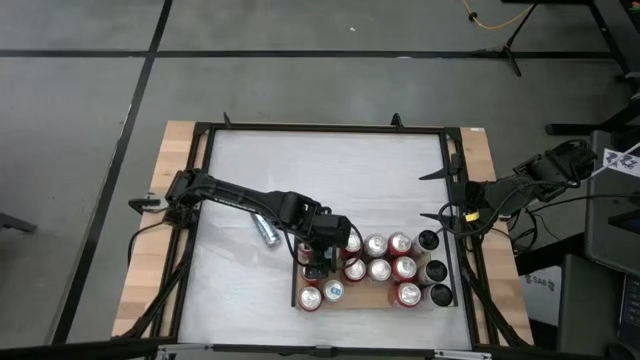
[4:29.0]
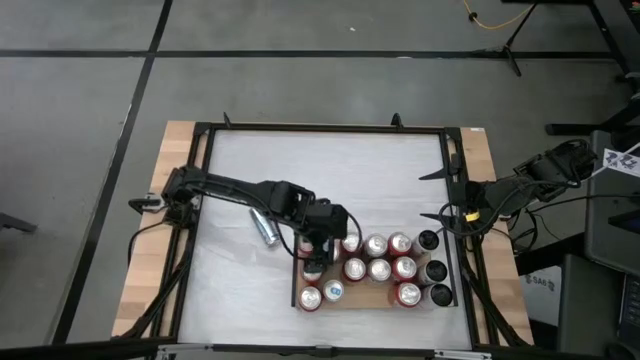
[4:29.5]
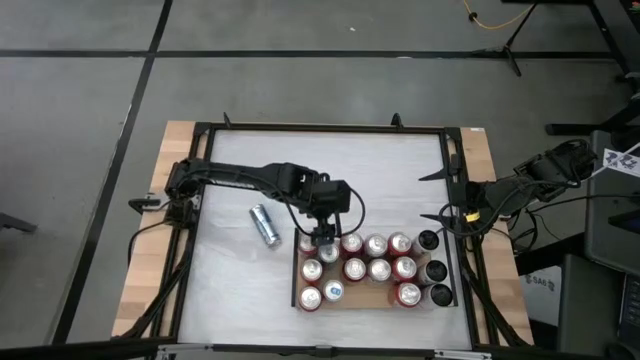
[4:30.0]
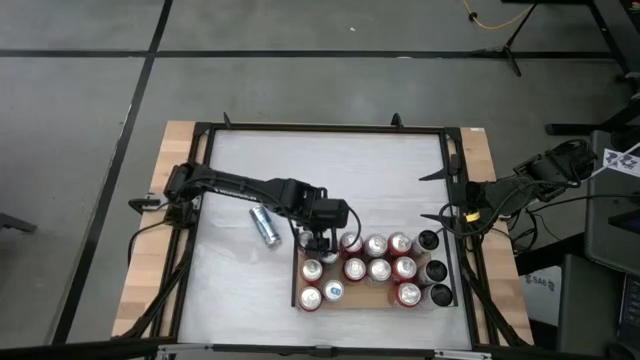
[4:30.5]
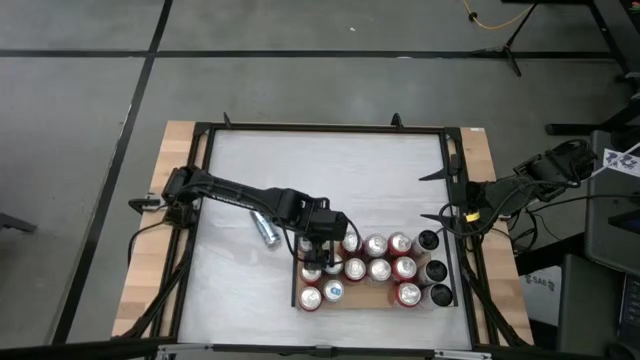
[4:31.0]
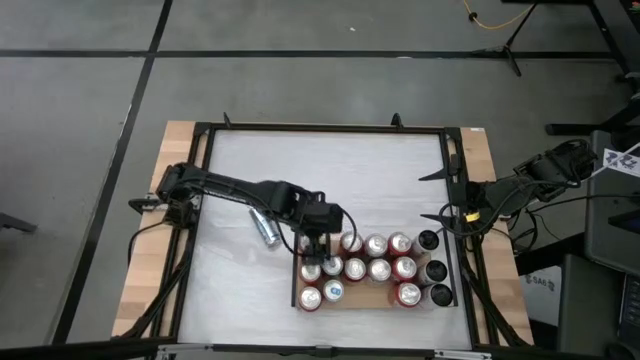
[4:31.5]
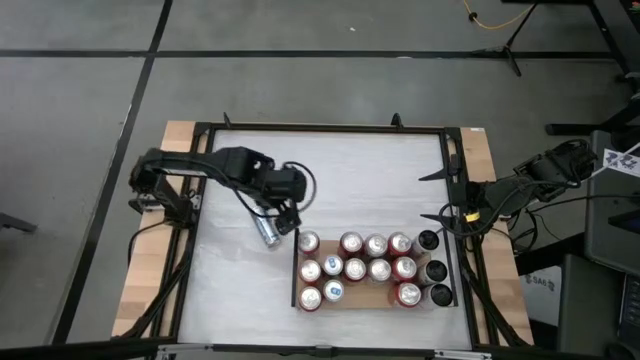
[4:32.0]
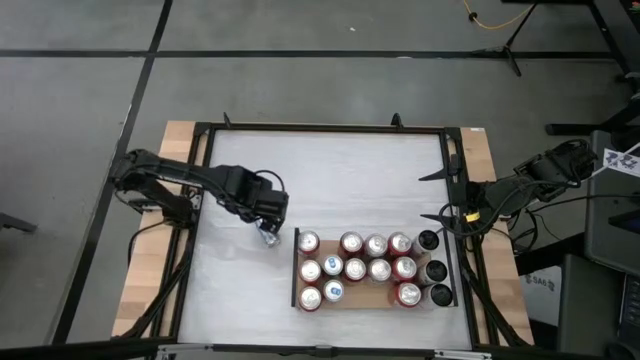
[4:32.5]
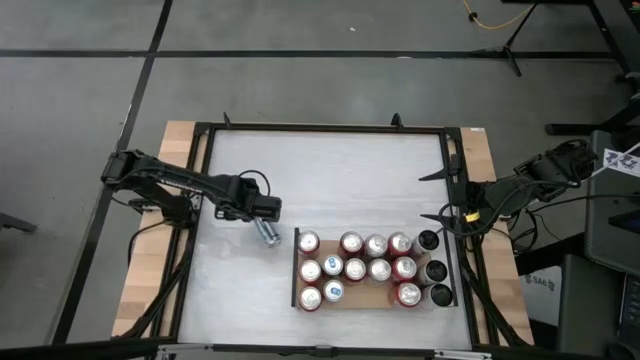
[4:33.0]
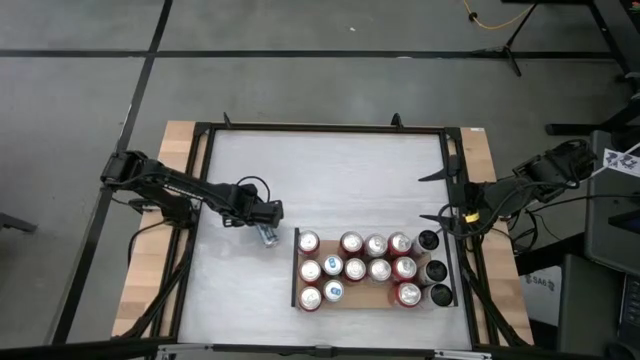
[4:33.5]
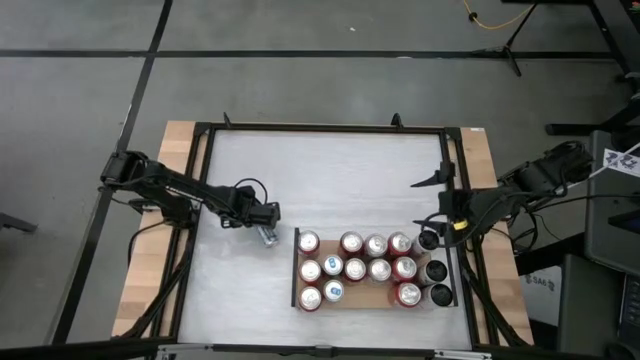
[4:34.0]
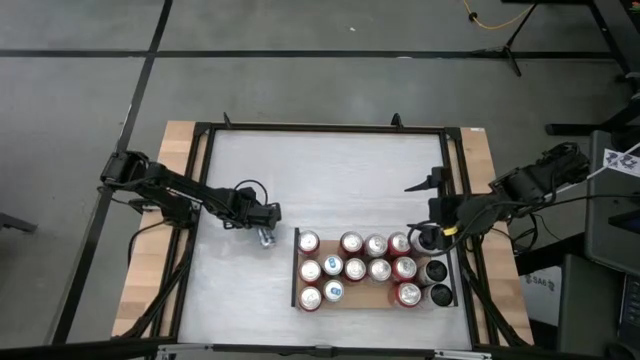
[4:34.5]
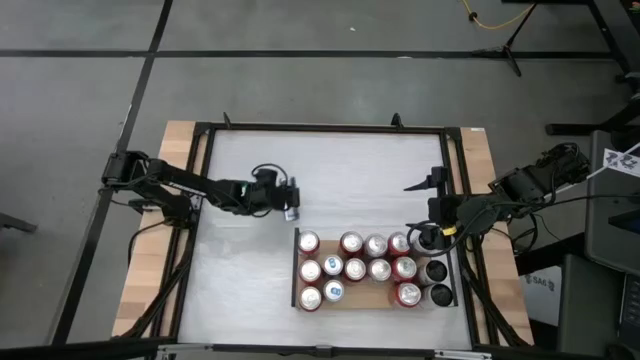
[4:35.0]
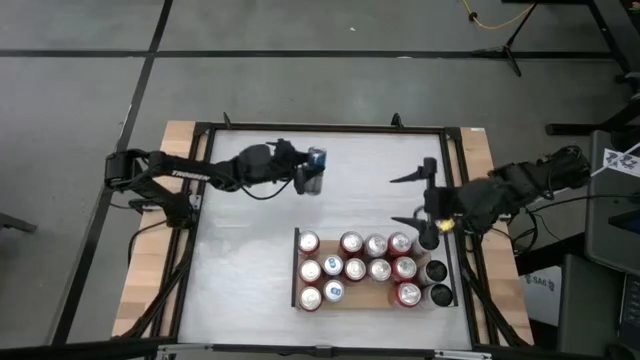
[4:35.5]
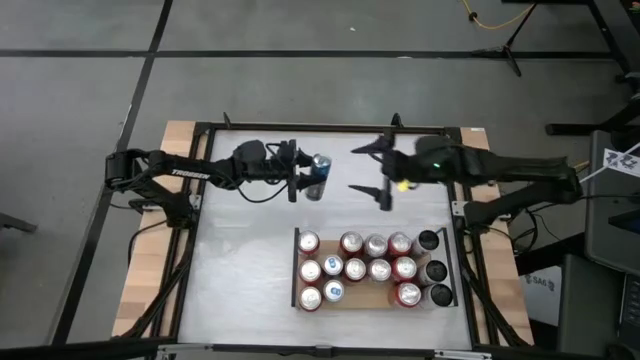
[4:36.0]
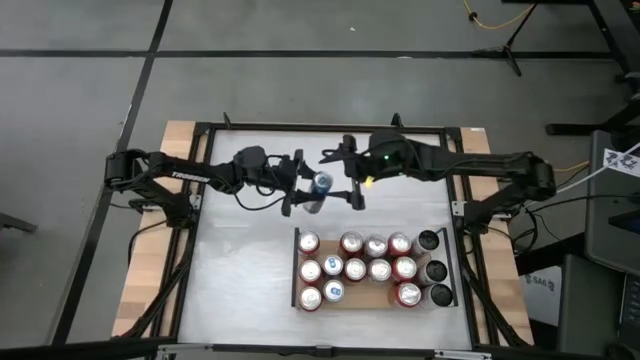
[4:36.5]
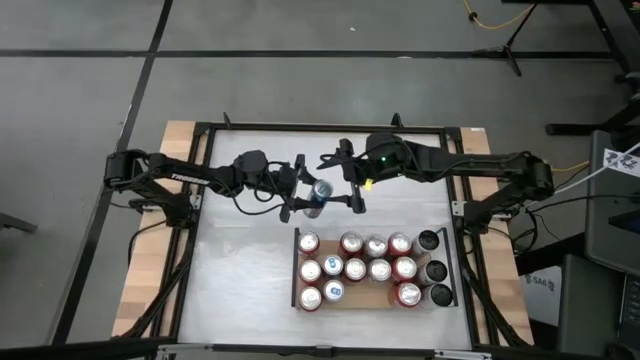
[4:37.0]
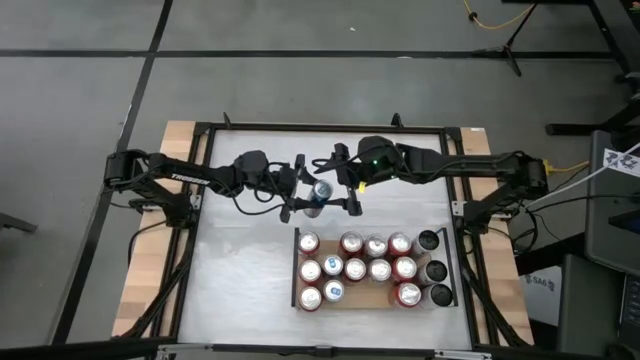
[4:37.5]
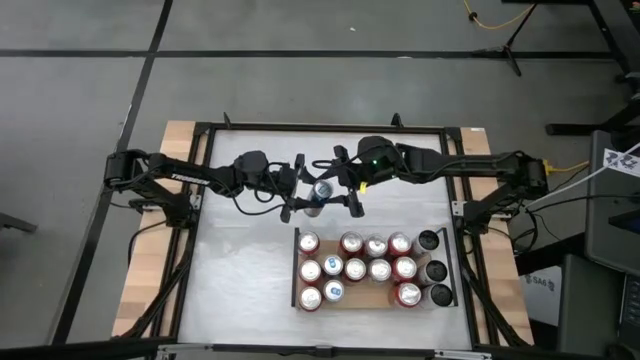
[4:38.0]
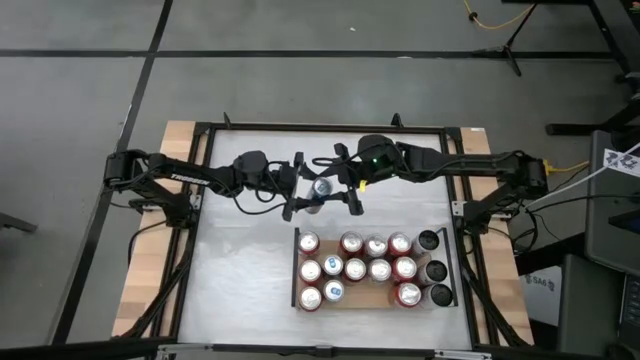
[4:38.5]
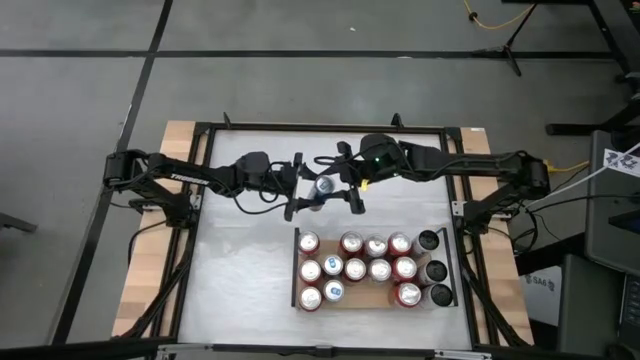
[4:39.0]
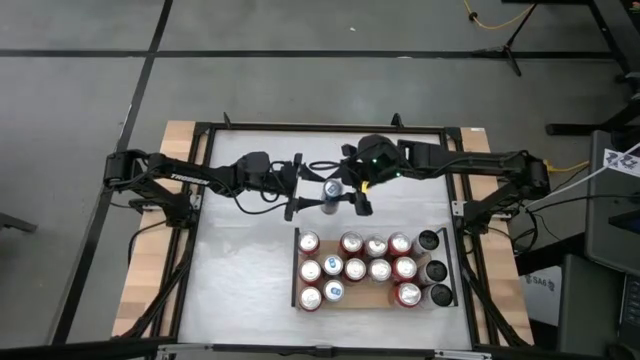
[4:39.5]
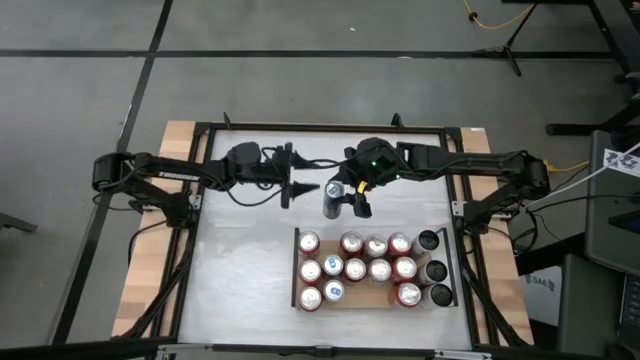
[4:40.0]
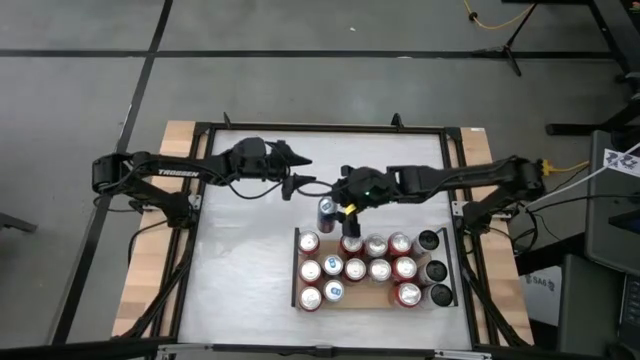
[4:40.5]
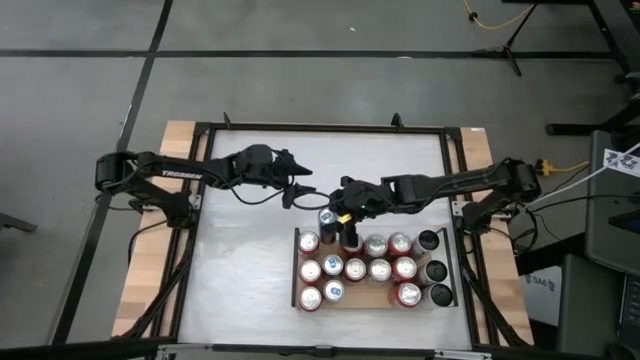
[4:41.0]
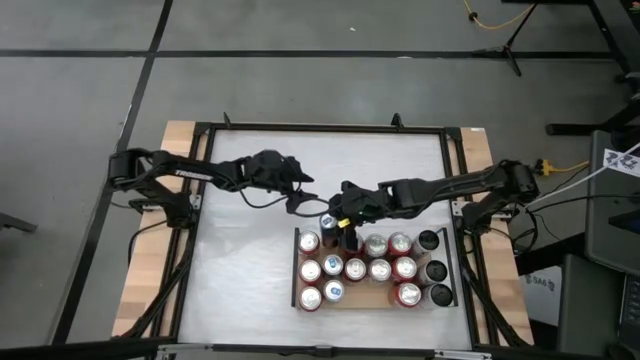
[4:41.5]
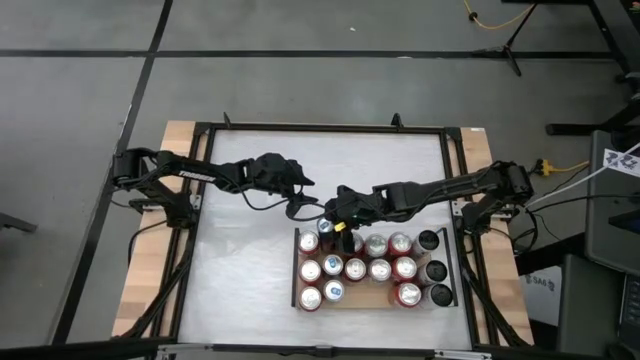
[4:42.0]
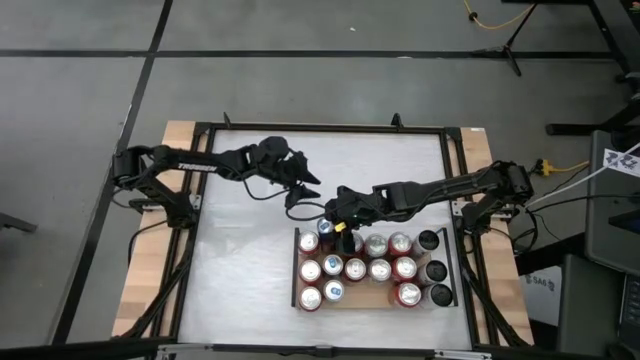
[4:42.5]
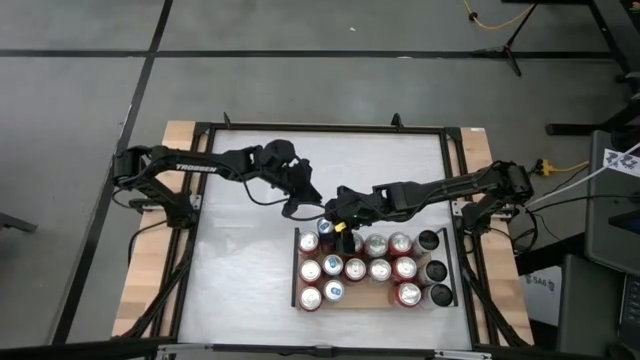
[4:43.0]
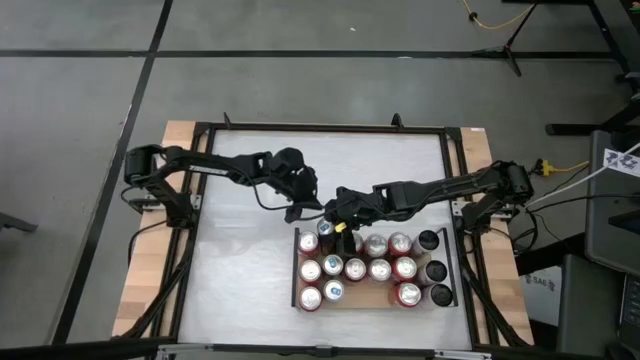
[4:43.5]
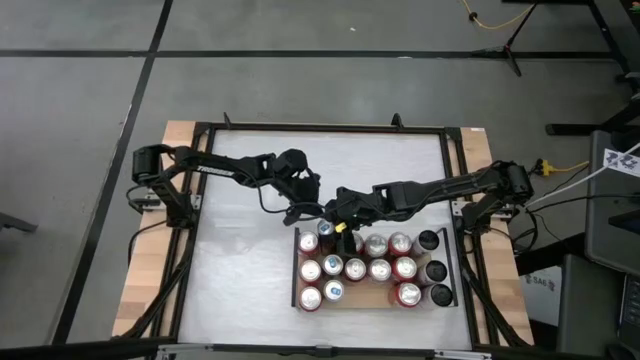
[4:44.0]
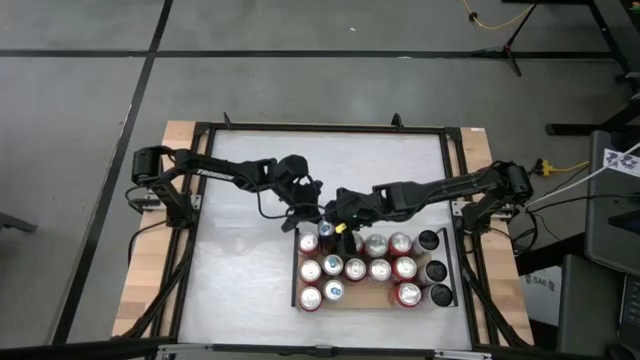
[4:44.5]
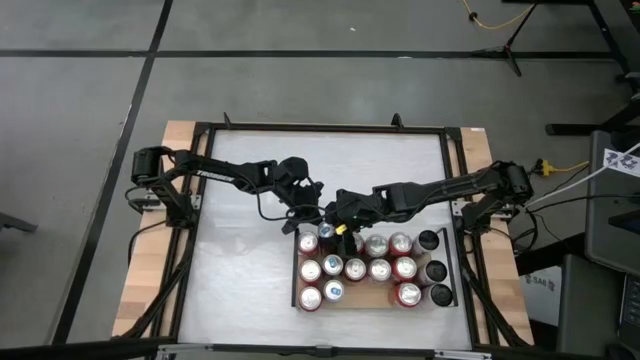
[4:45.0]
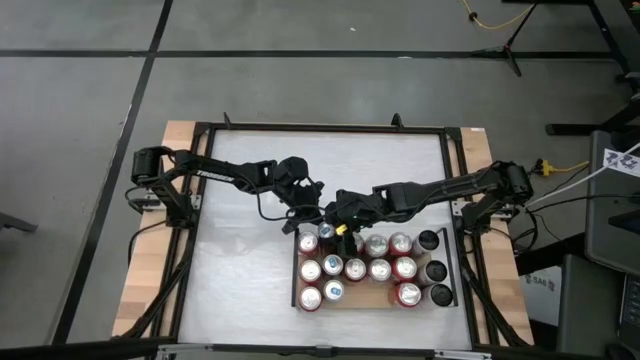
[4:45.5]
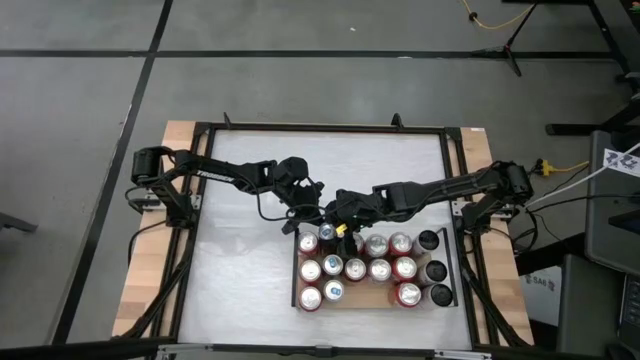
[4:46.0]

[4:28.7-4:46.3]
Task: Place canned beverage on shelf
Put the blue soda can on the shelf

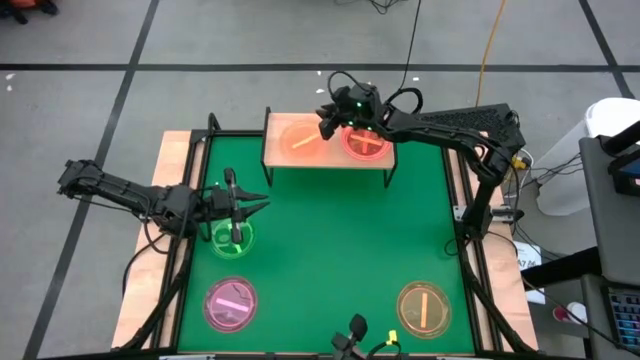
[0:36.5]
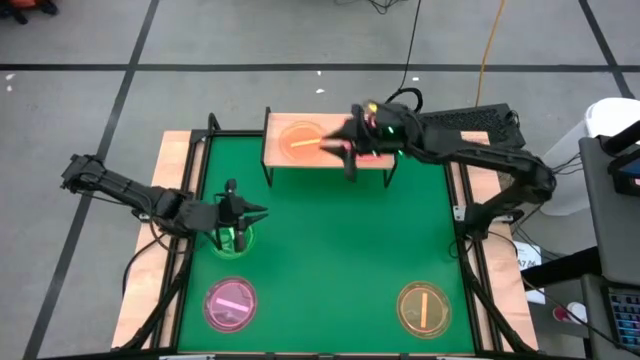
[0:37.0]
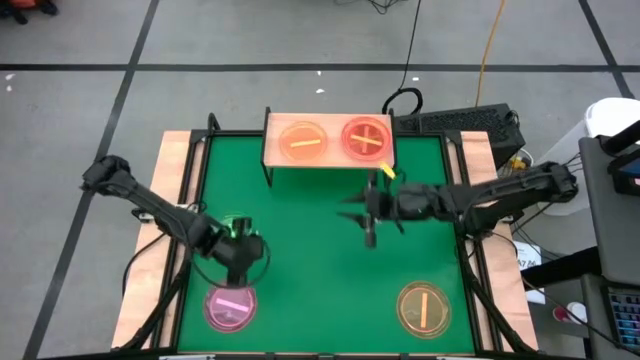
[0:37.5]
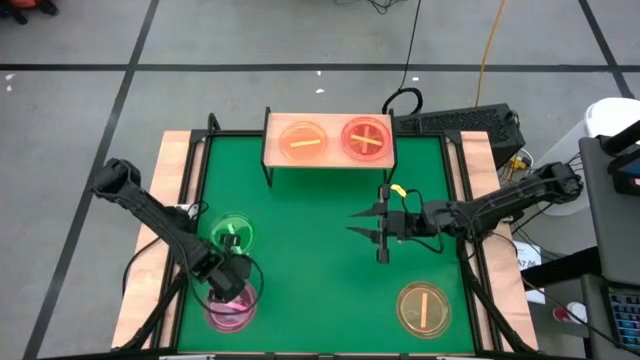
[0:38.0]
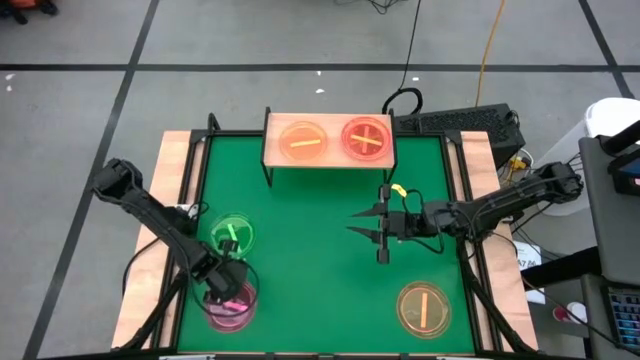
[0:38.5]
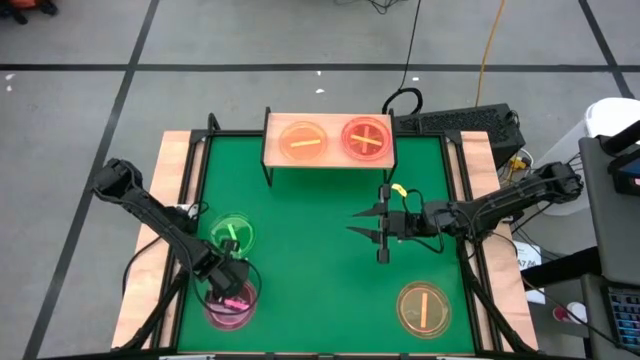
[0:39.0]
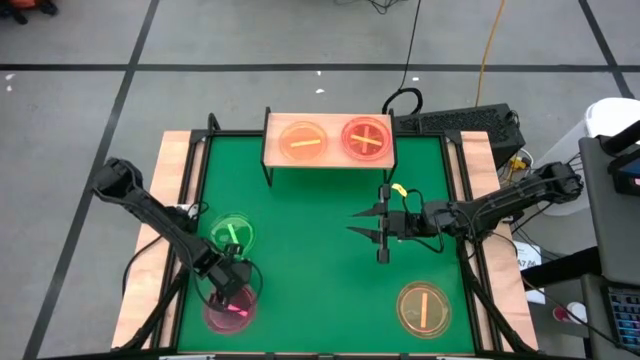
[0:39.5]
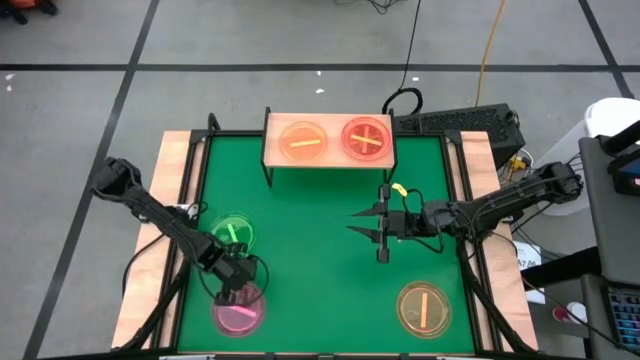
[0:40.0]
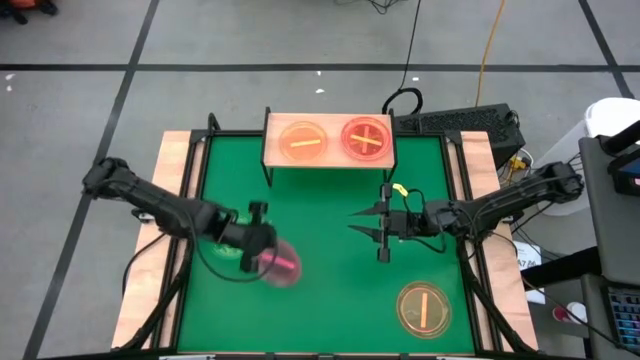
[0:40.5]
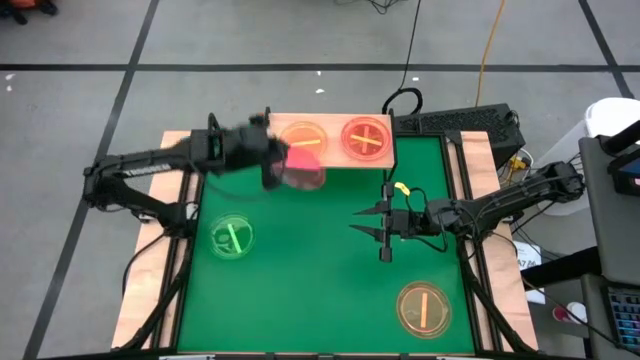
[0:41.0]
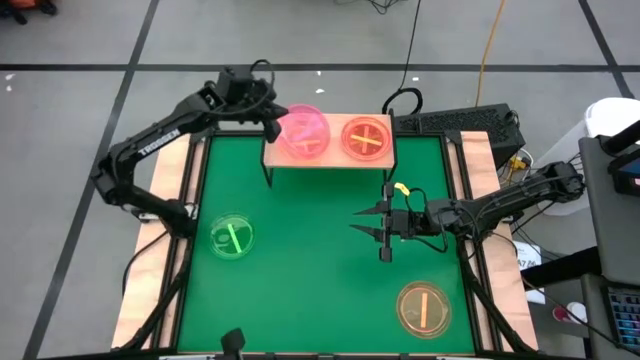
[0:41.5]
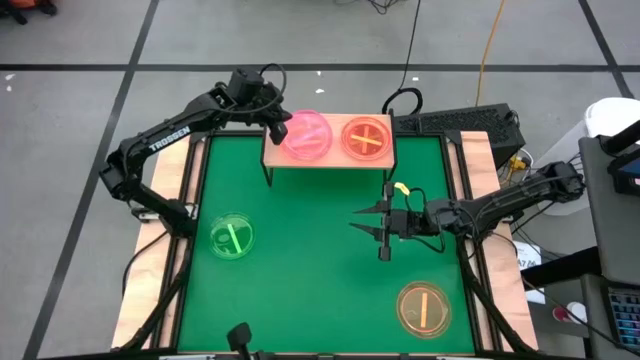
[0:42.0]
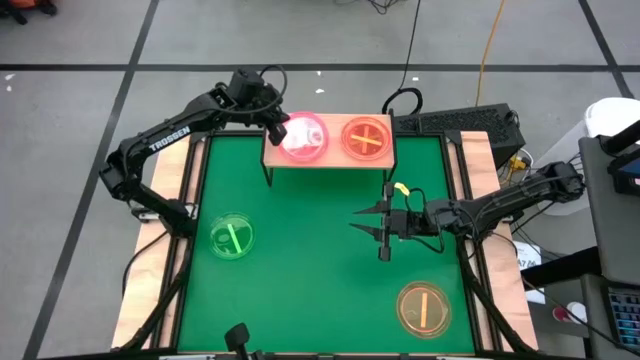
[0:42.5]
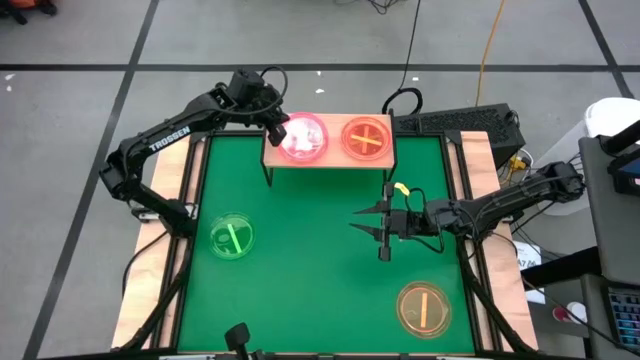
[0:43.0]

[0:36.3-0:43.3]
Task: Place and stack plates onto a shelf
Stack the pink plate on top of the left orange plate on the shelf
